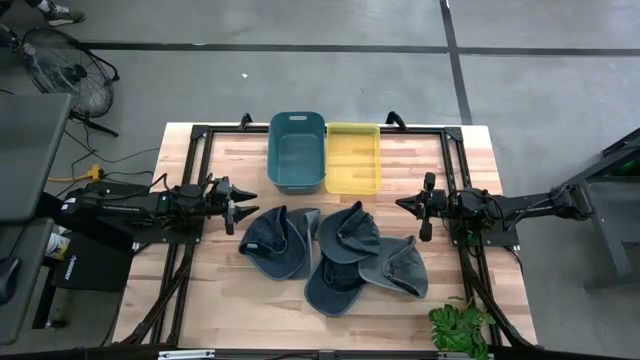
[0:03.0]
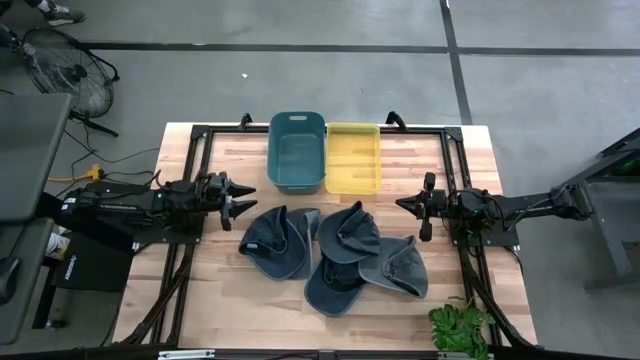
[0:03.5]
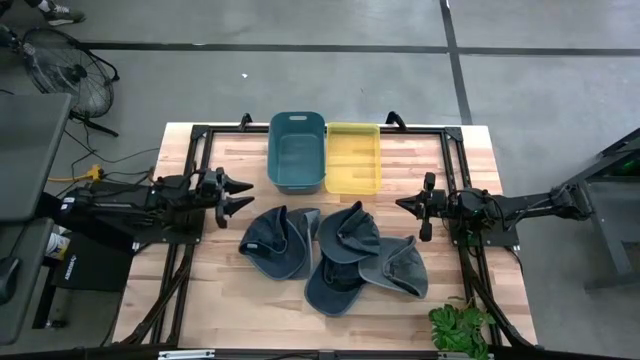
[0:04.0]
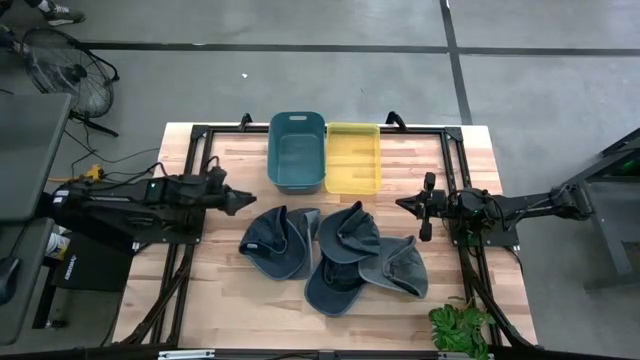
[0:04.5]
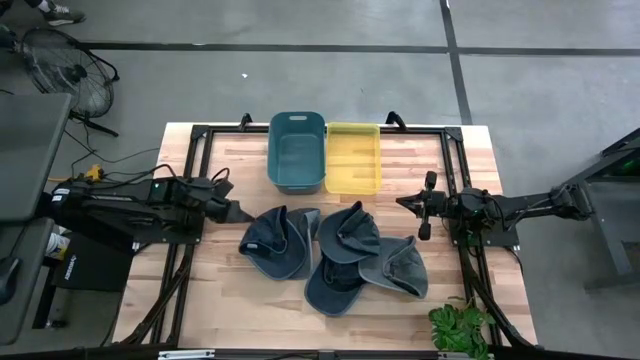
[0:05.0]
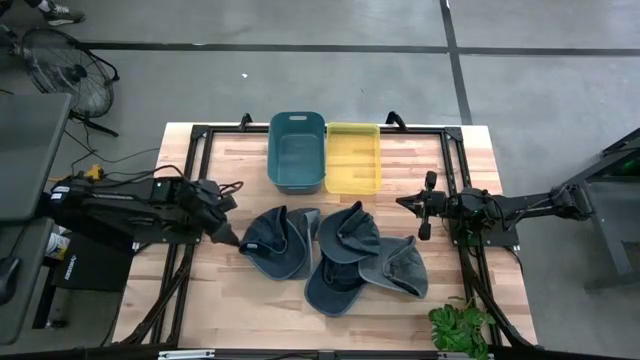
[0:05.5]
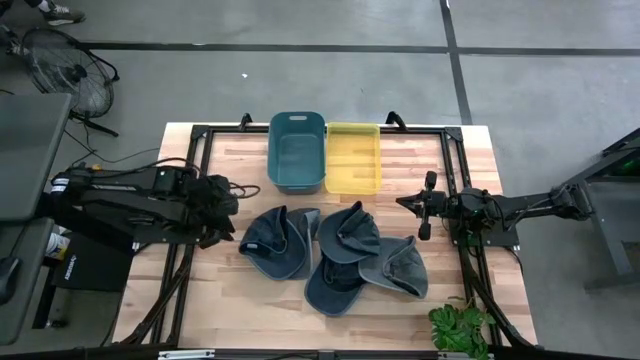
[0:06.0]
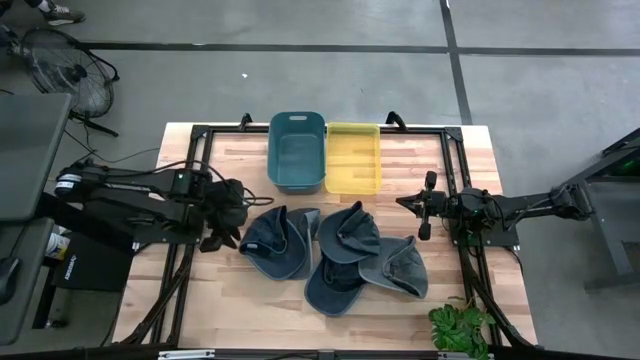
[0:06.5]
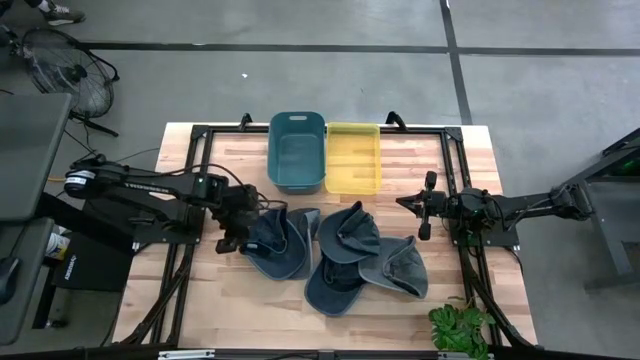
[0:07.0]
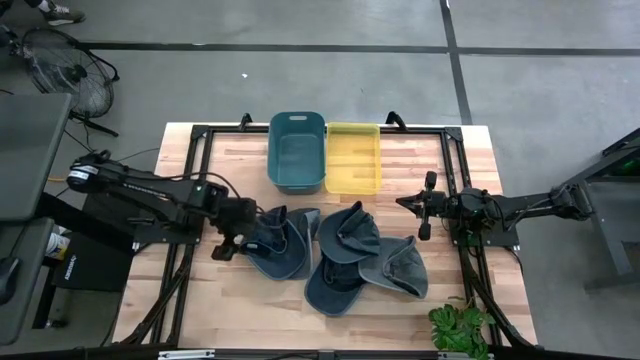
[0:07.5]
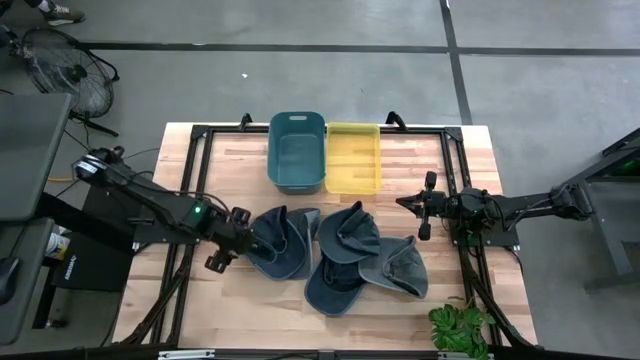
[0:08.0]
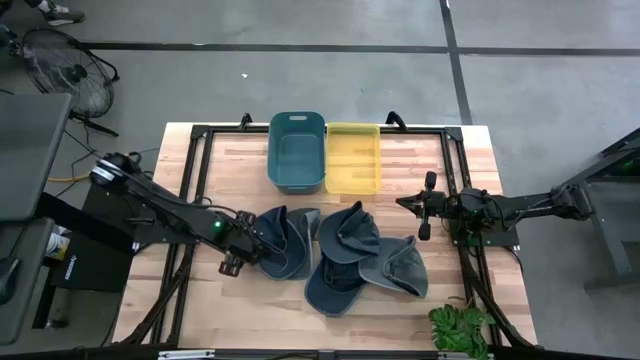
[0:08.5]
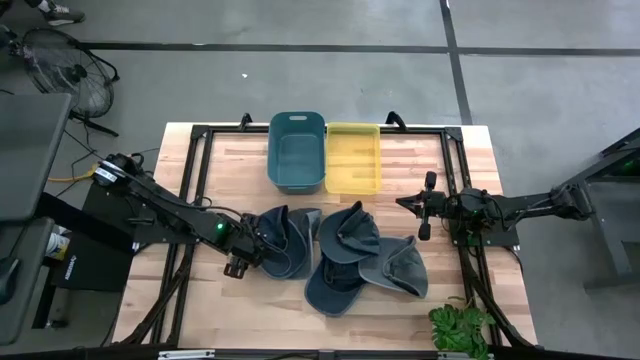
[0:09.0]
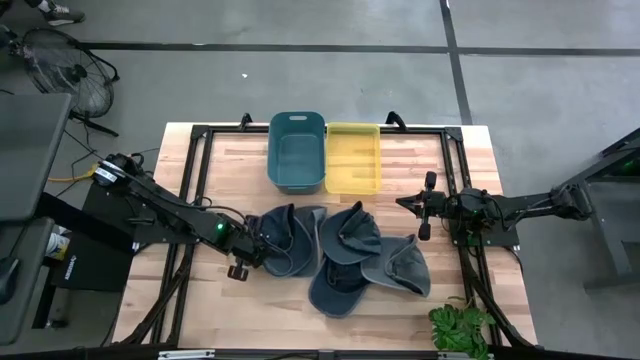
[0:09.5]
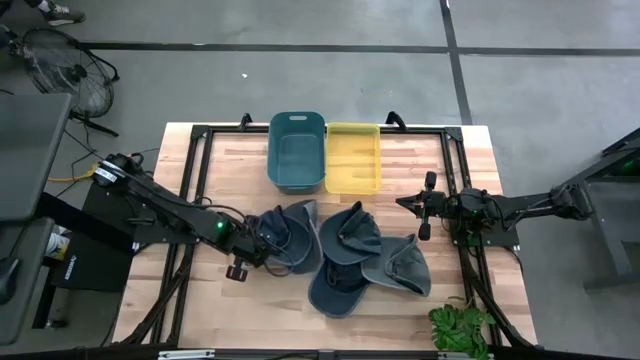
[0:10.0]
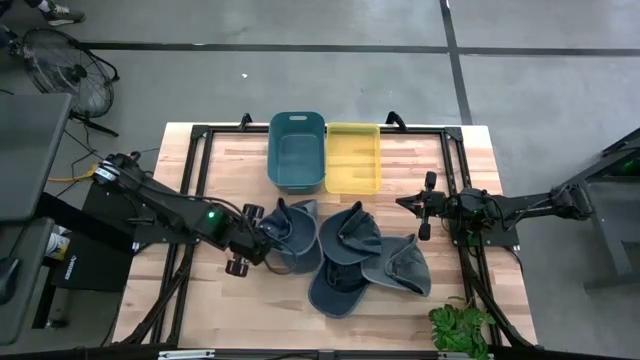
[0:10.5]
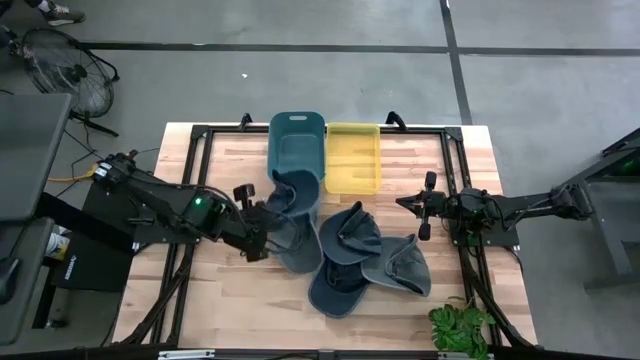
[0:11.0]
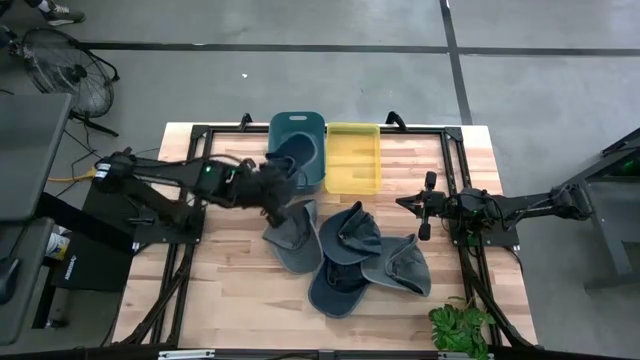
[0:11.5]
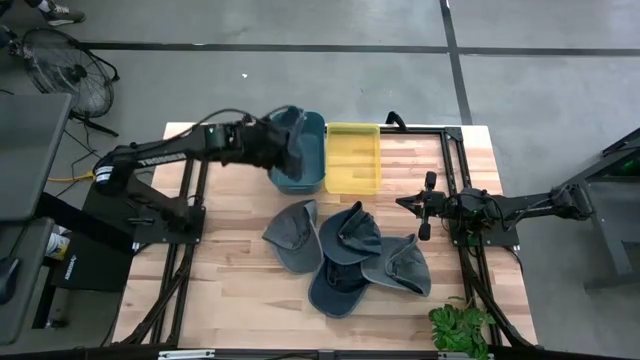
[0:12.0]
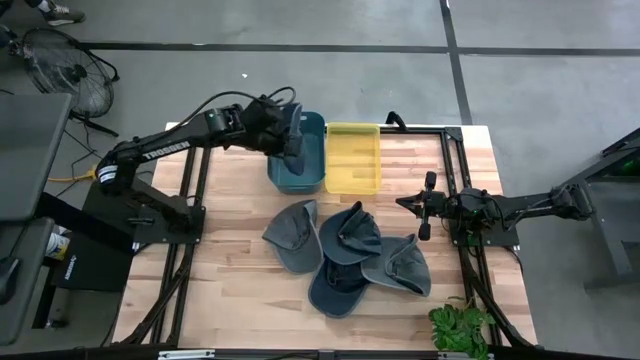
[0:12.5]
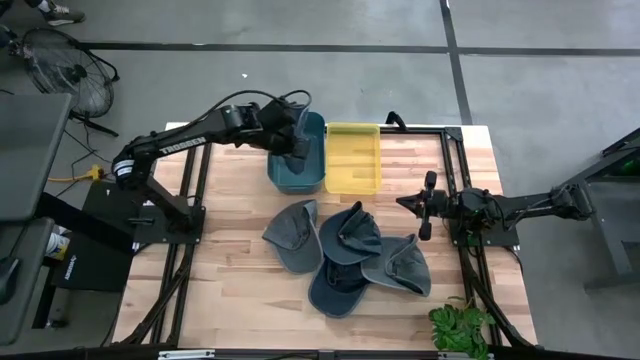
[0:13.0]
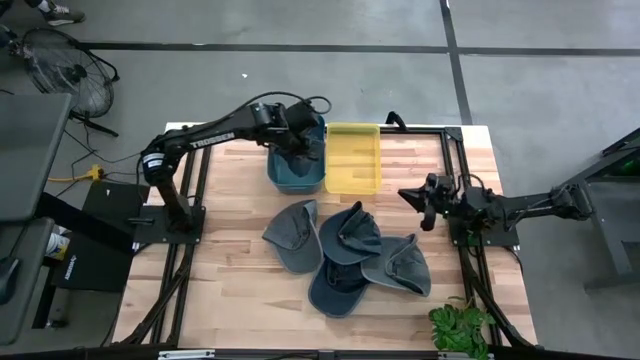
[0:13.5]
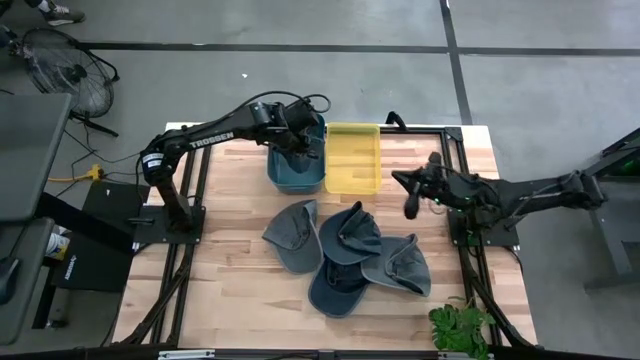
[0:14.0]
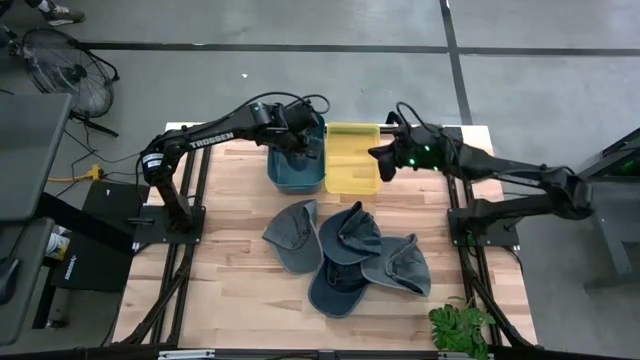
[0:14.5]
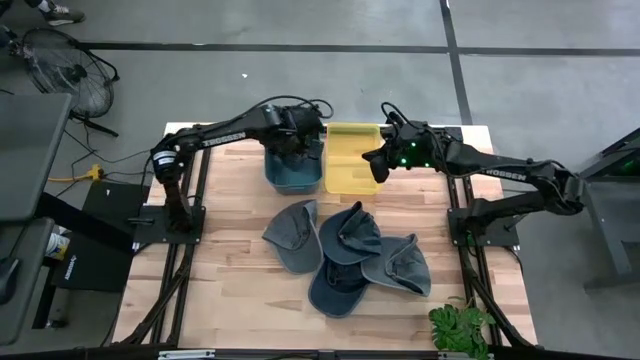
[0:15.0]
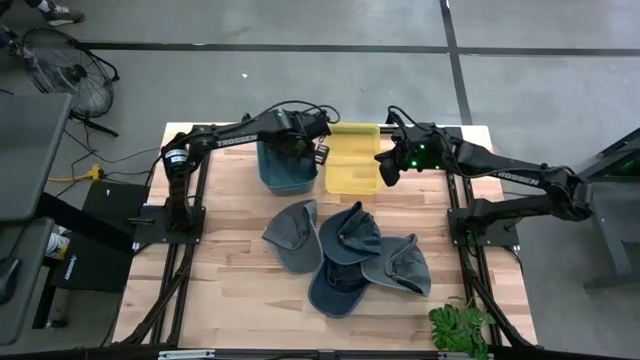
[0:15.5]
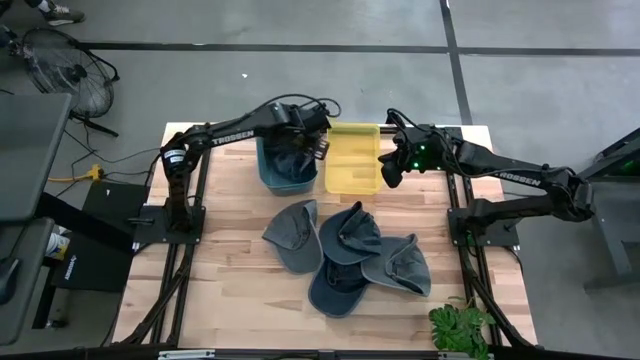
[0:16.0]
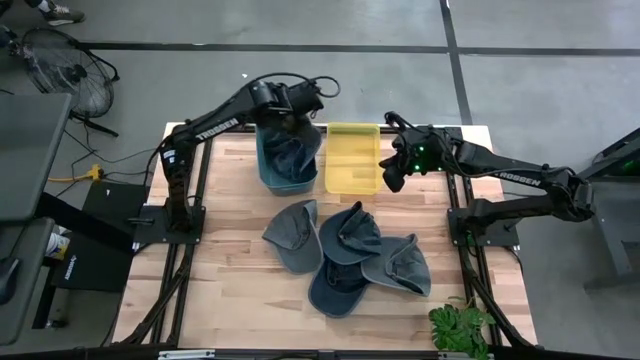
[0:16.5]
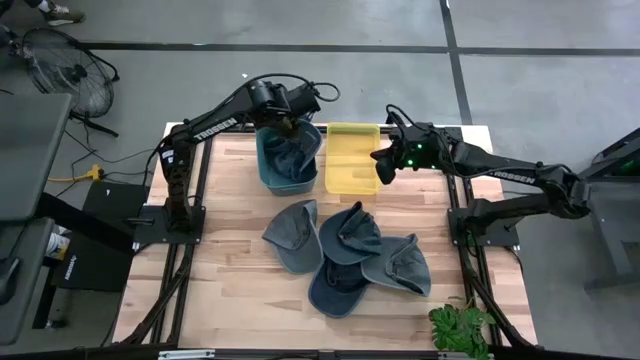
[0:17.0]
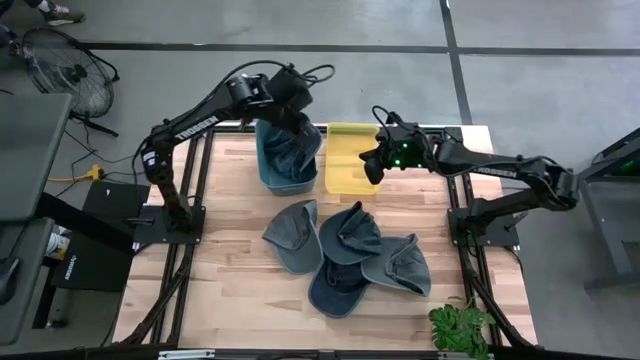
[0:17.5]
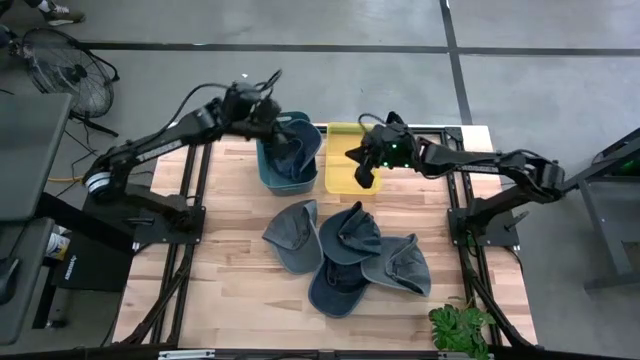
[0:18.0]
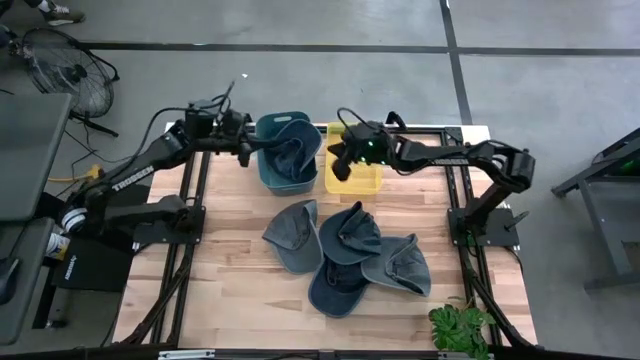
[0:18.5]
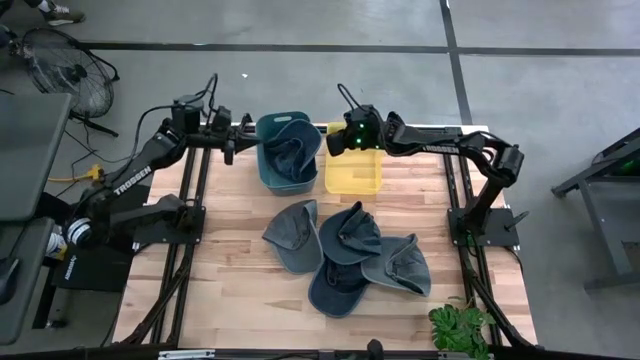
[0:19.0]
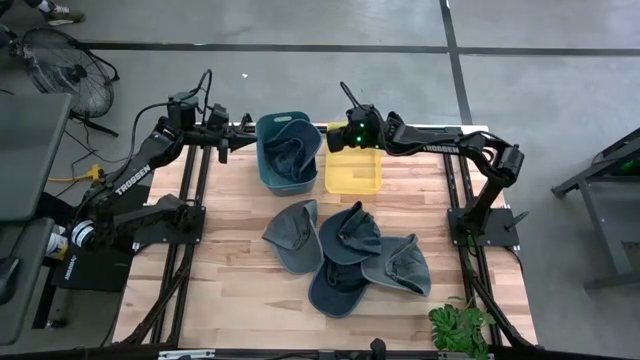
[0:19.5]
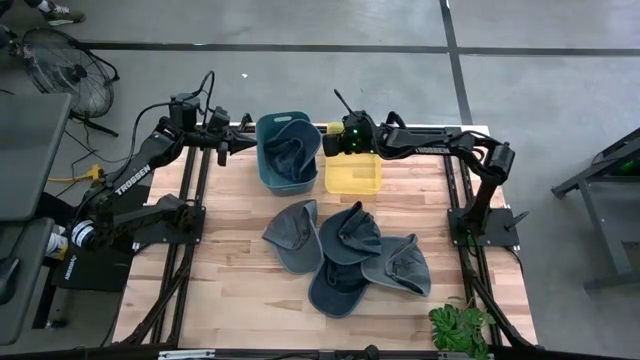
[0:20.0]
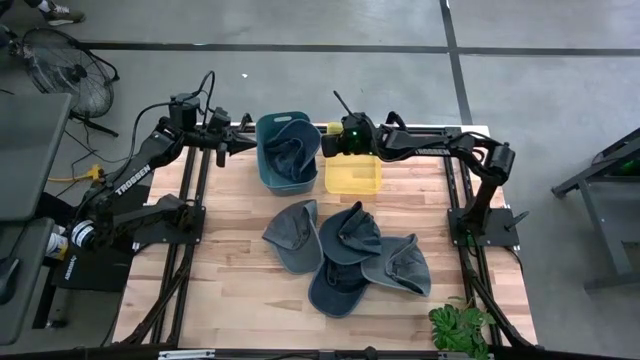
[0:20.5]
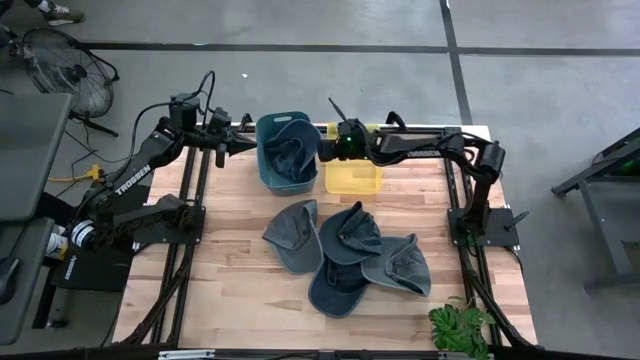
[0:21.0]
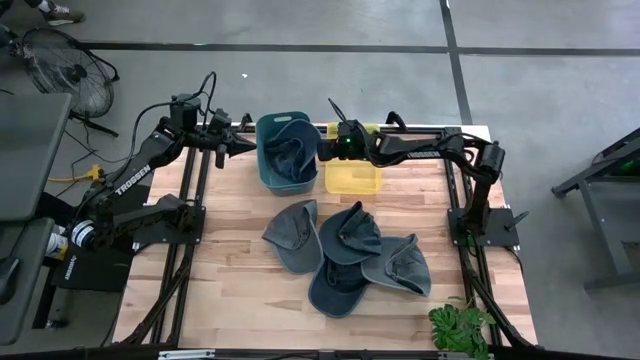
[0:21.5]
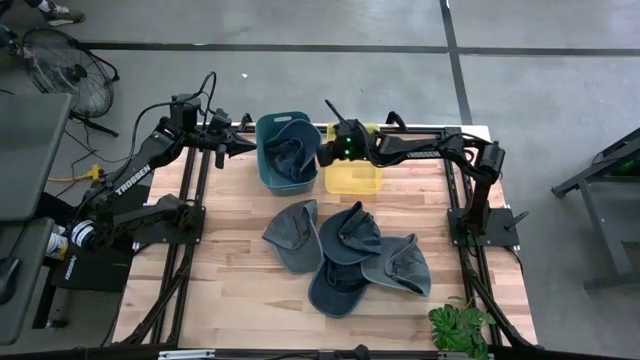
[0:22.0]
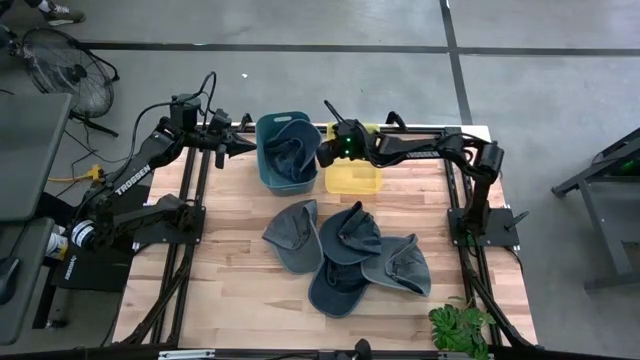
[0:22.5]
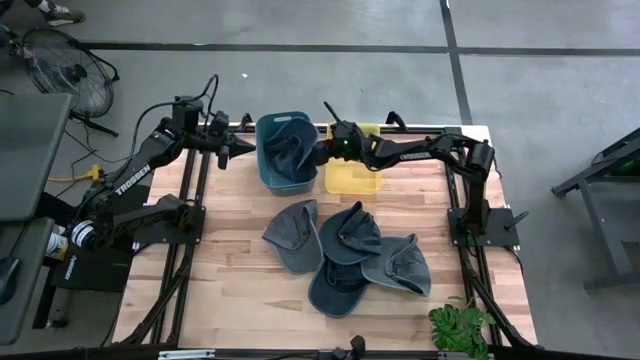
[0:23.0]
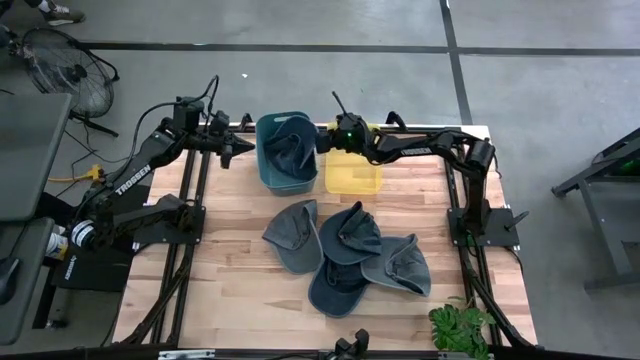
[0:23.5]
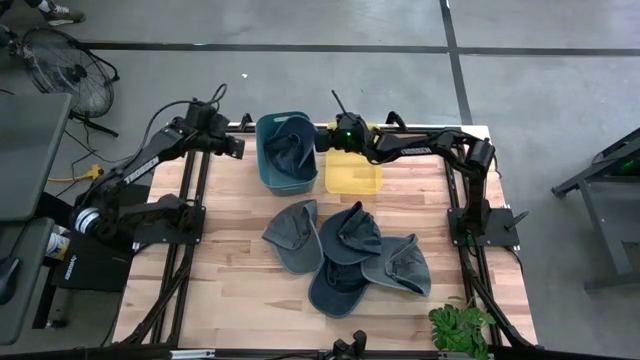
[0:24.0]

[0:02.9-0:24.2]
Task: Pick & Place hat
Put the top left blue cap into the blue bin

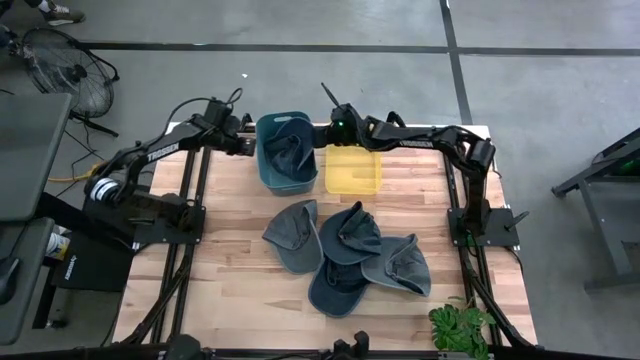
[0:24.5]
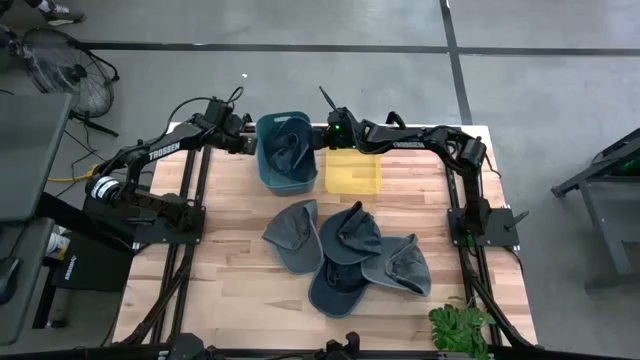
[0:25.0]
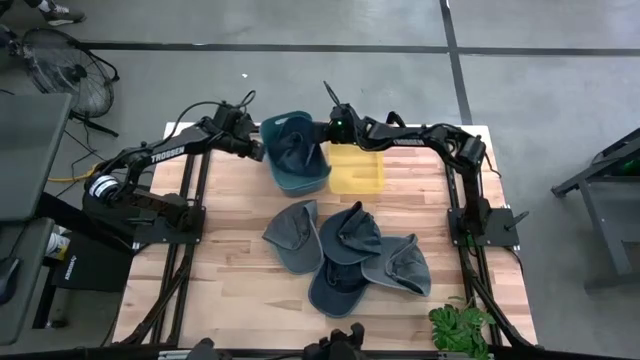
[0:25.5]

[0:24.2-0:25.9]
Adjust the blue bin on the table
